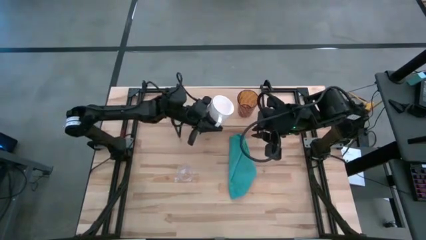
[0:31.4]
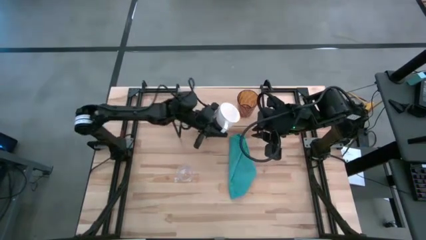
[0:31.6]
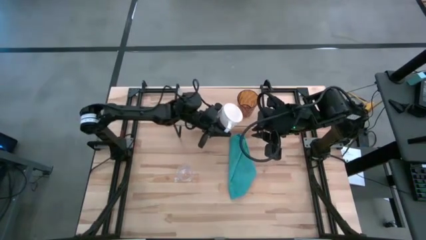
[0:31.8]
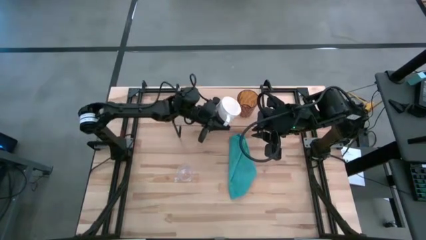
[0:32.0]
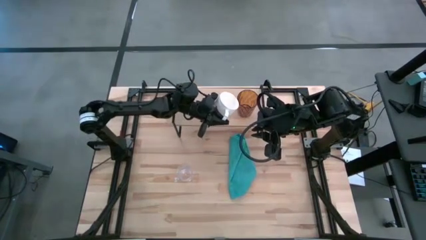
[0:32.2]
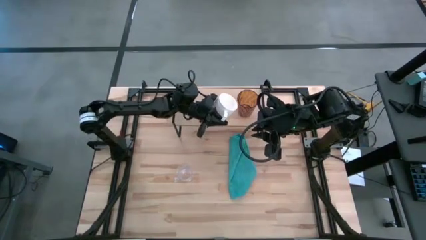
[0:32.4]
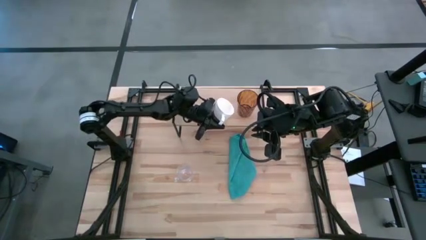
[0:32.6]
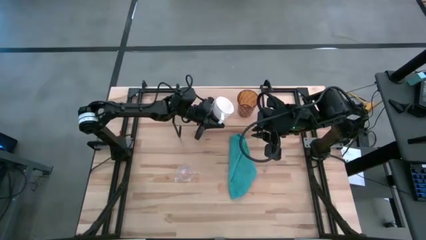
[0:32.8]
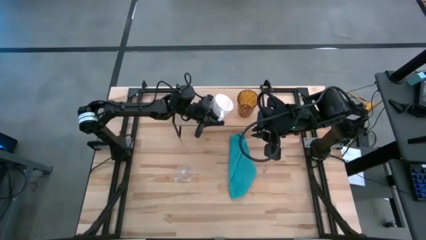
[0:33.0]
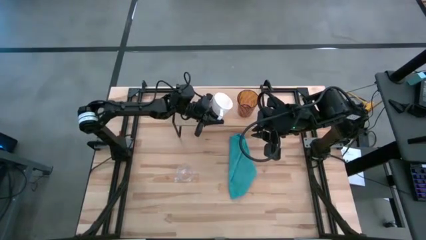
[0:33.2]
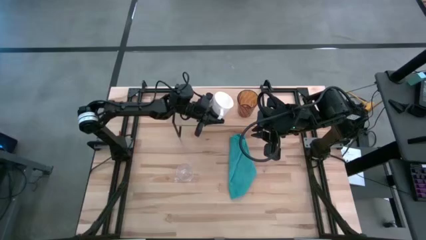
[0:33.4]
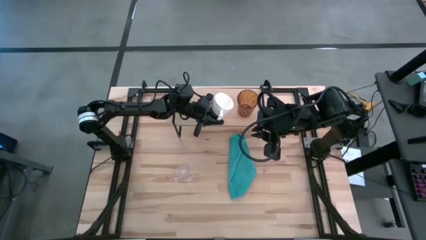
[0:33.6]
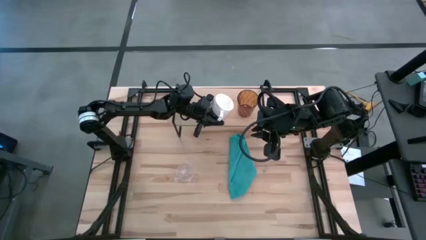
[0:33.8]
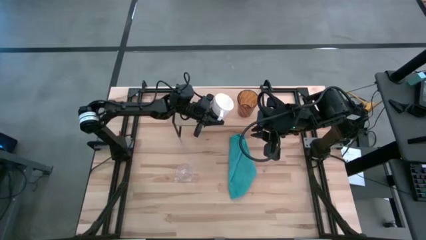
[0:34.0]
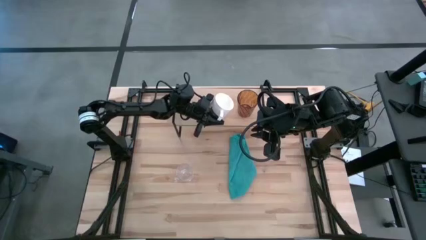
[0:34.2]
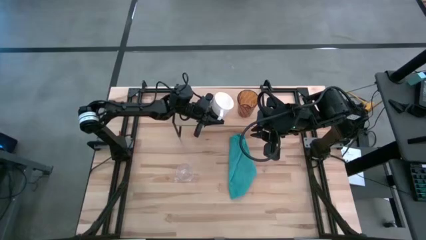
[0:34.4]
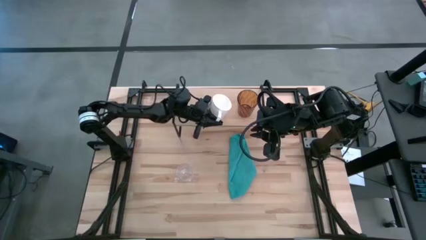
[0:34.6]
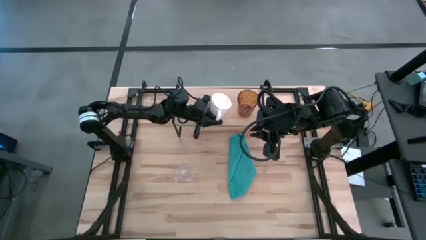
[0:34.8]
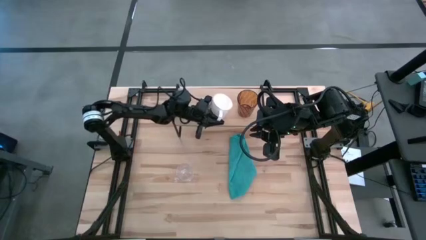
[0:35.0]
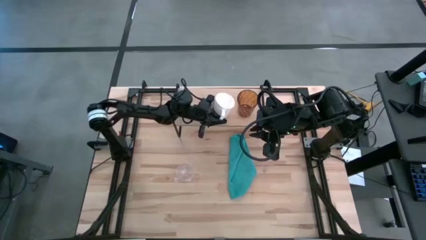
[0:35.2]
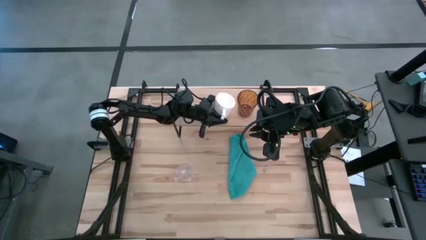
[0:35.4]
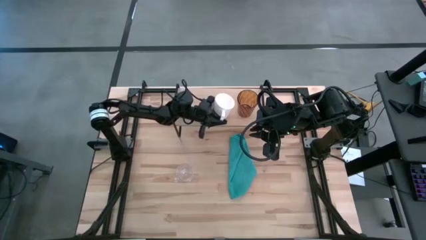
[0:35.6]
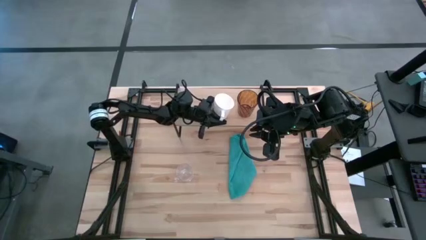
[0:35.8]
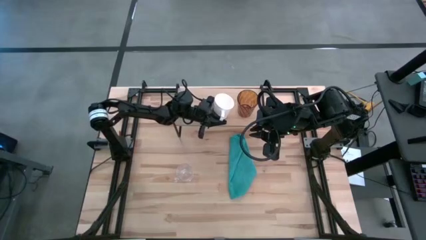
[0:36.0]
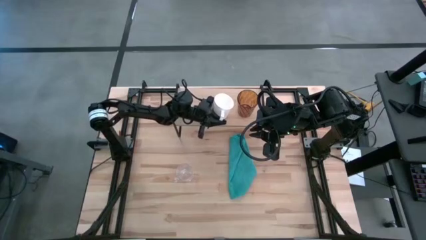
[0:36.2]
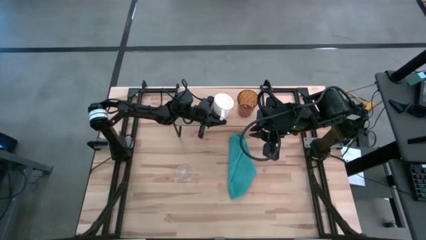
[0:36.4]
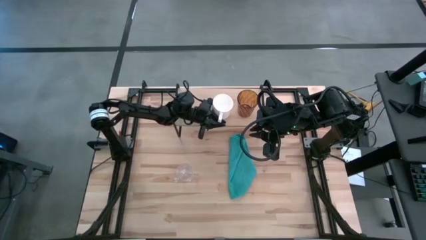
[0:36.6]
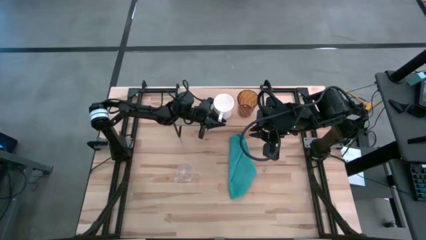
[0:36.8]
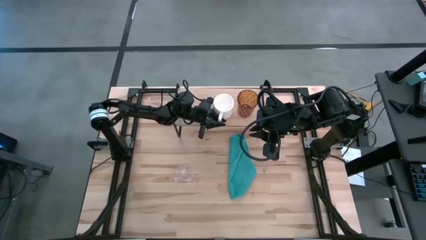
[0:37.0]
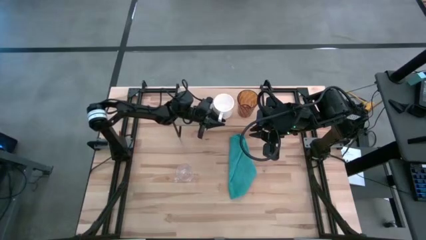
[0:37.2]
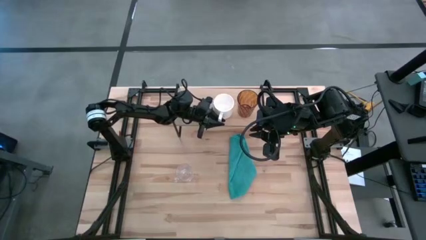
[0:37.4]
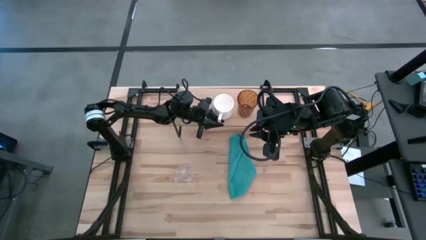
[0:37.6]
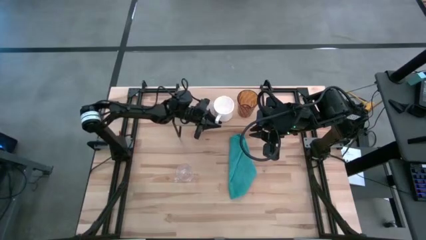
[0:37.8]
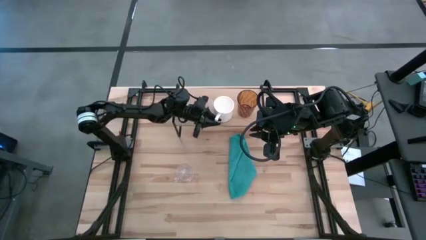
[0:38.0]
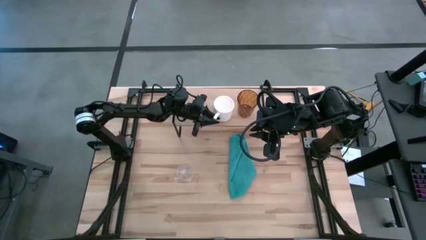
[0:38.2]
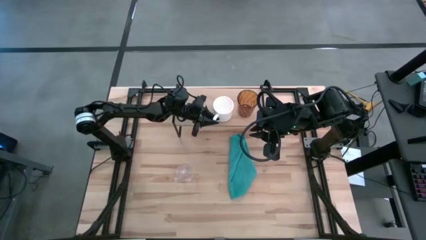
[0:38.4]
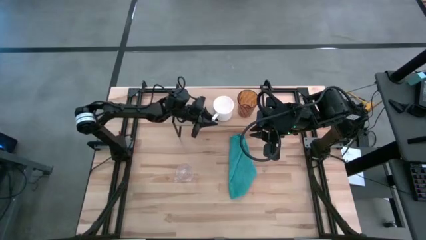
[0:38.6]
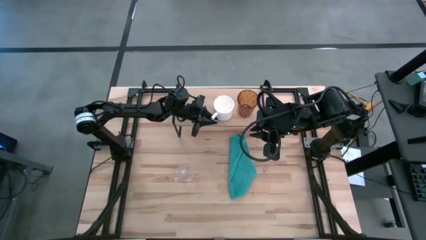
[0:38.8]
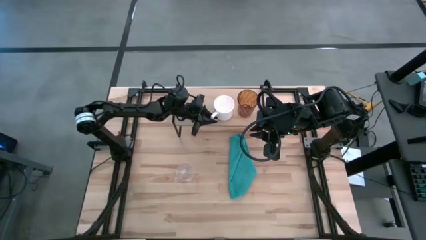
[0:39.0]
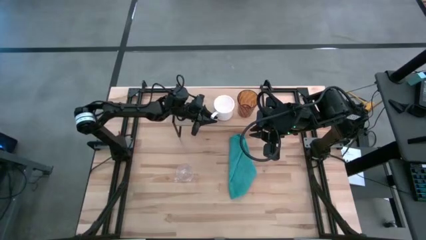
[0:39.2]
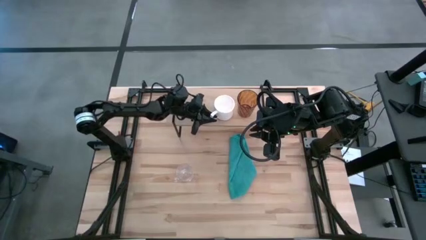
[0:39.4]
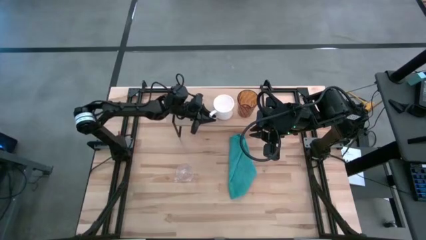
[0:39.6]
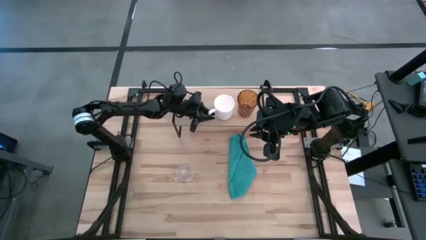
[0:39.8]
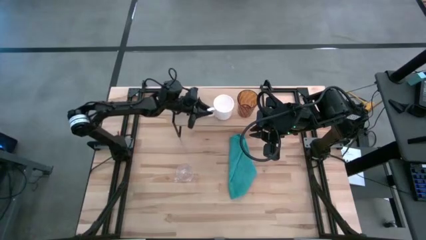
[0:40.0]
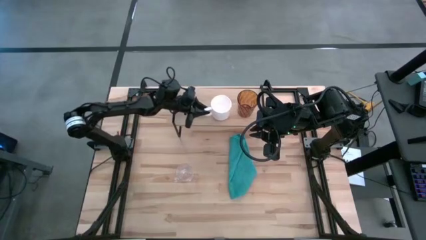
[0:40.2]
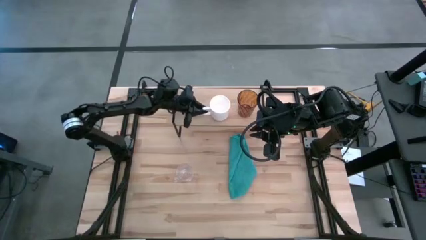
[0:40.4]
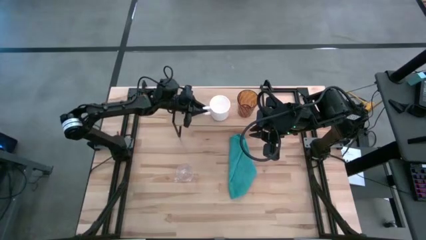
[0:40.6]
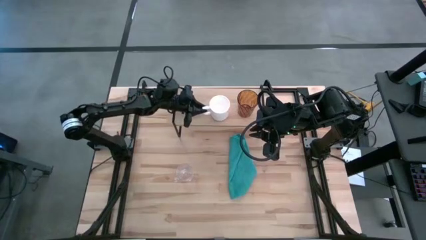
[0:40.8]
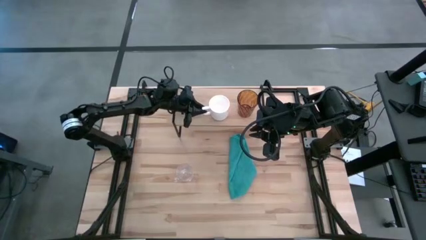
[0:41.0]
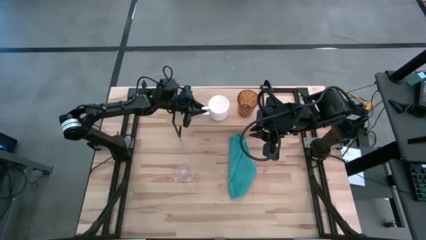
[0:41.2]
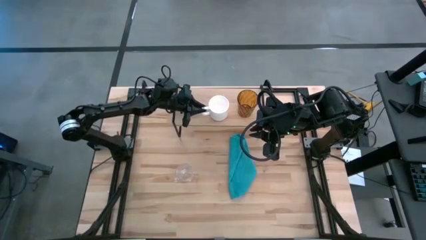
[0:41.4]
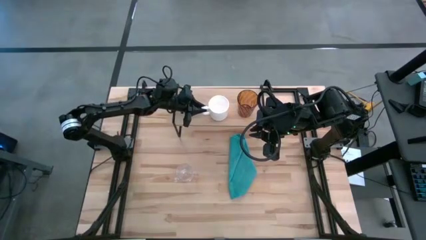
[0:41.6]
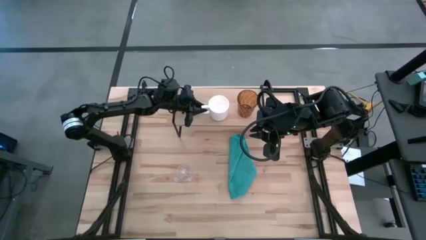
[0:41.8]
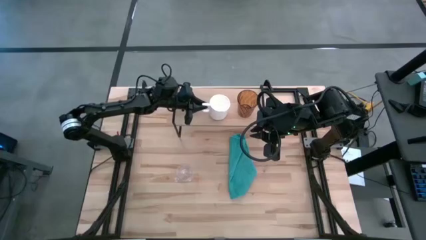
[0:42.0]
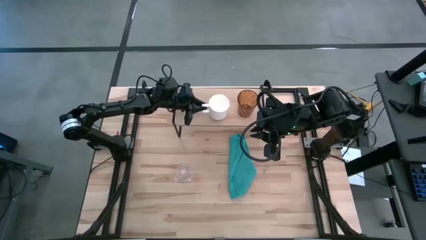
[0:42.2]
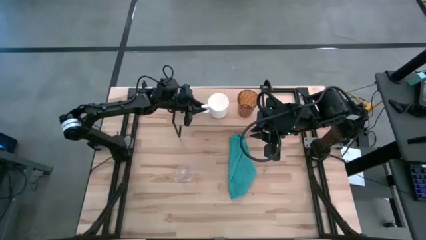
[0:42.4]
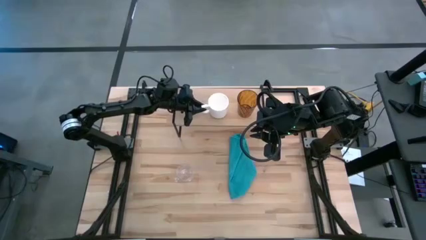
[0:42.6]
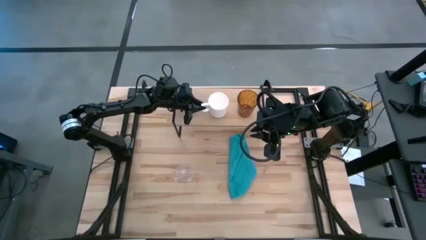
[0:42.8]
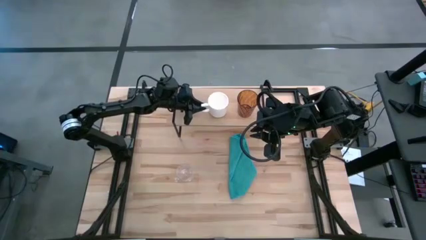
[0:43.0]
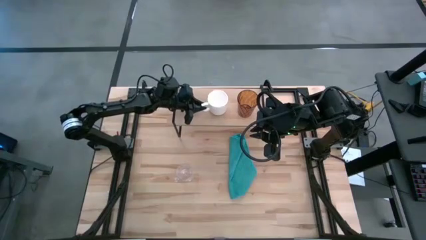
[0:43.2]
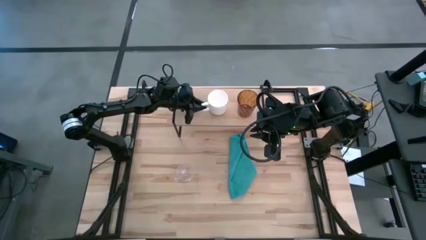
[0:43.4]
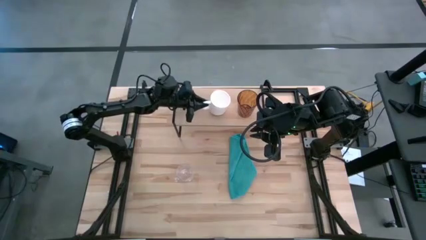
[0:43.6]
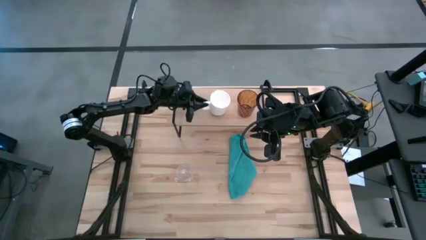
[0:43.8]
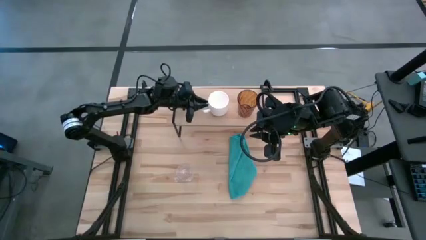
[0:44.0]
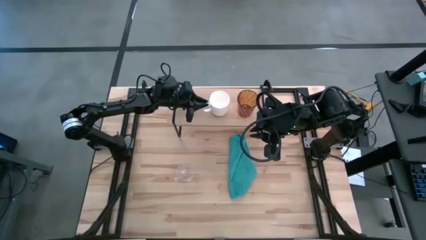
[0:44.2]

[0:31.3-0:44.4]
Task: Stack small to large cups/mugs on shelf
Put the white mug on the shelf

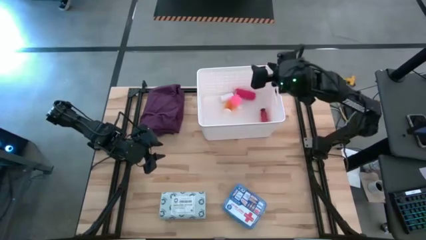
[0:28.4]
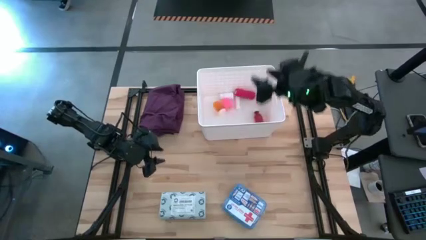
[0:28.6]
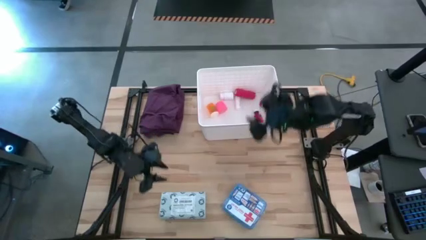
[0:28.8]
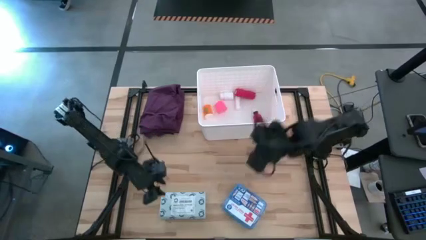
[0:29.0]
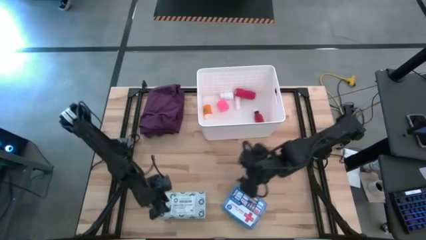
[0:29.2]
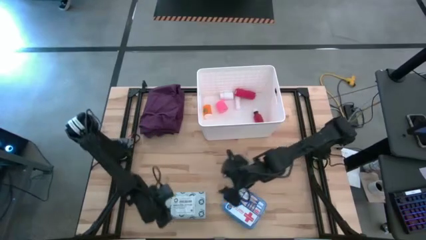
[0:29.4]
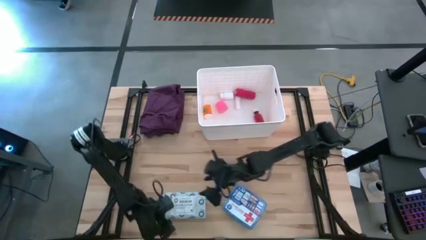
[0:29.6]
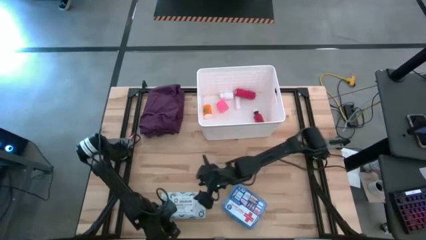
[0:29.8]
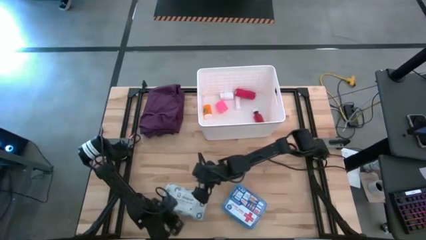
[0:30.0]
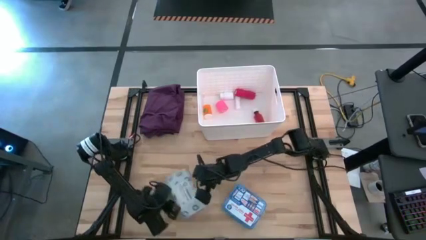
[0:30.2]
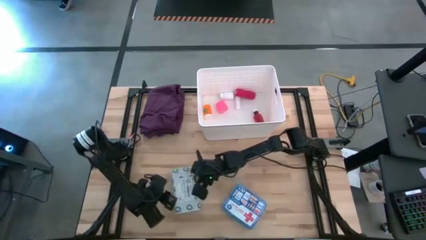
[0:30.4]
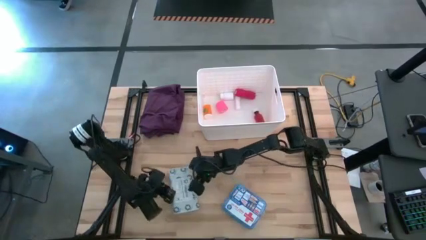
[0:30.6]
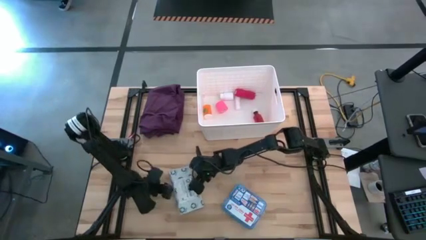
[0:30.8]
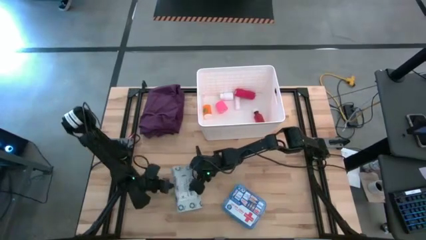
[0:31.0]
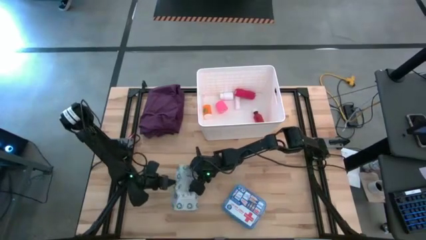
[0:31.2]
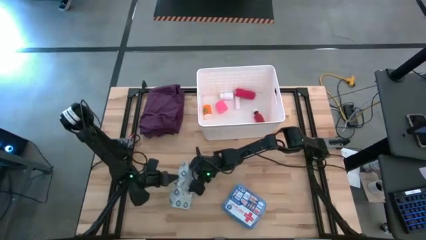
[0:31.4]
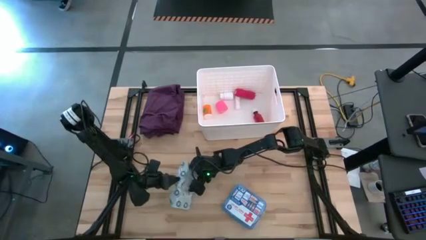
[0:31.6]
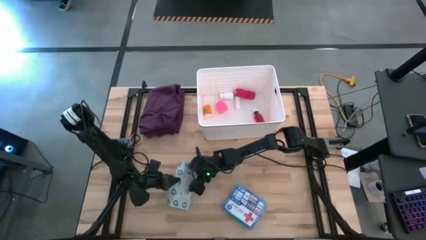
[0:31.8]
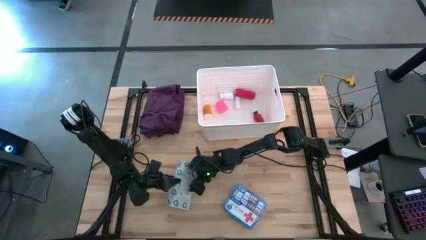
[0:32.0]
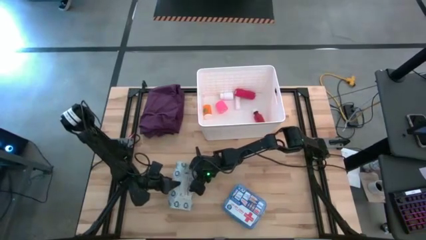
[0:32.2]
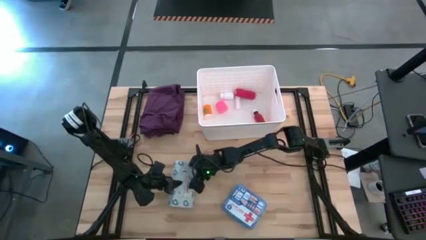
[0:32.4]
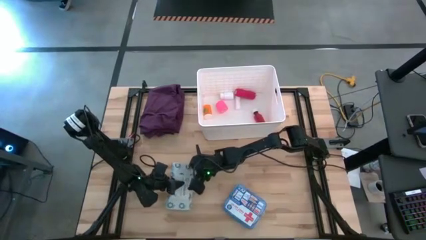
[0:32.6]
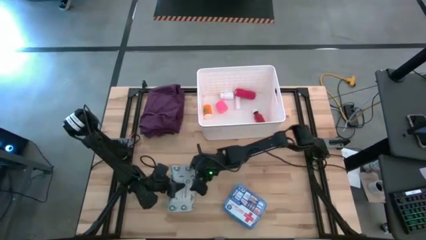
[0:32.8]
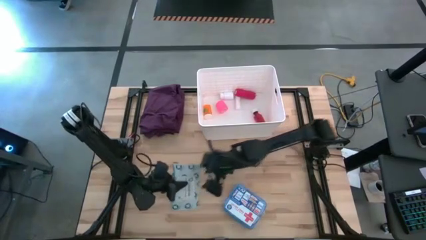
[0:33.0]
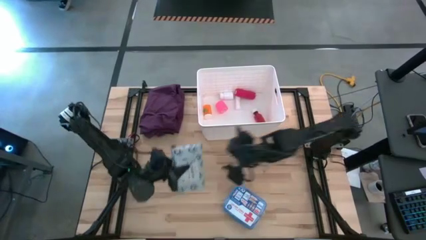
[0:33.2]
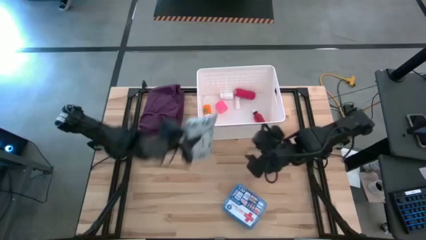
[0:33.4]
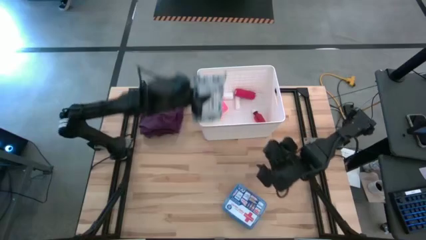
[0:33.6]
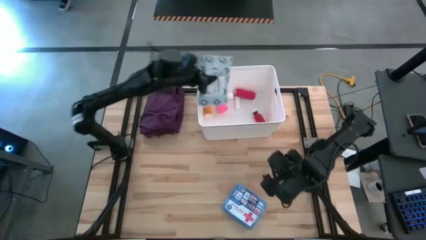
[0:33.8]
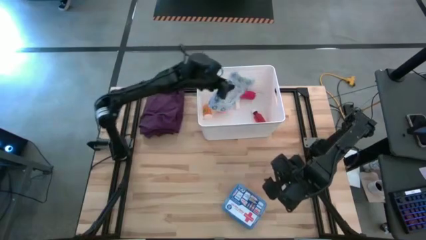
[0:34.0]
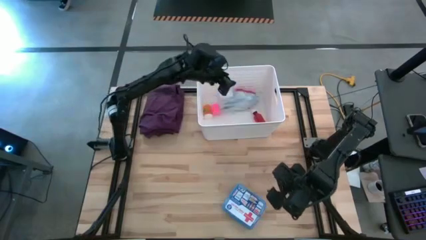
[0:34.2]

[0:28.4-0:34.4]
Task: Pick & place medical supplies in basket/bin
Put the mailer bag into the bin
